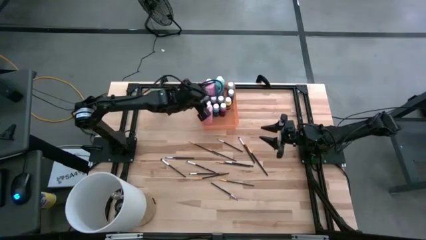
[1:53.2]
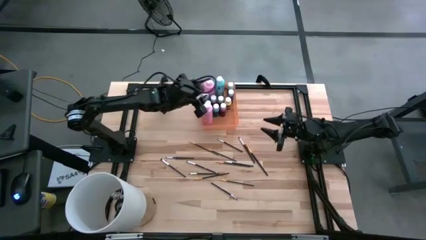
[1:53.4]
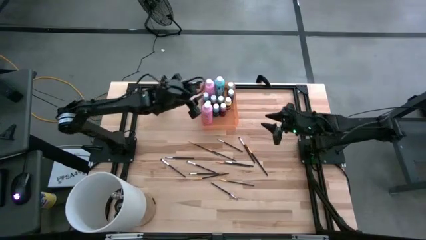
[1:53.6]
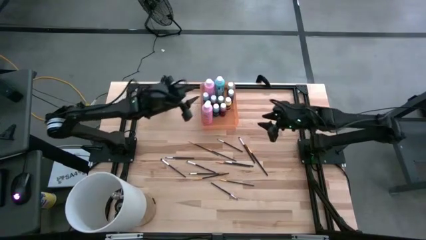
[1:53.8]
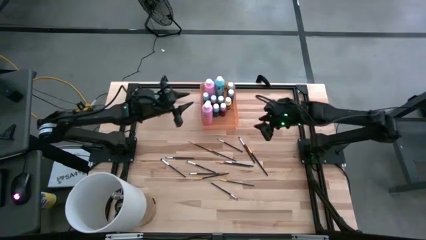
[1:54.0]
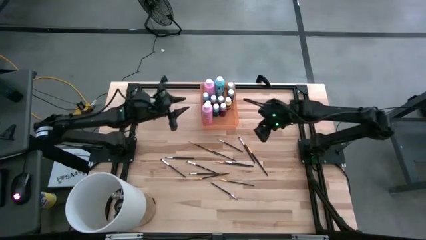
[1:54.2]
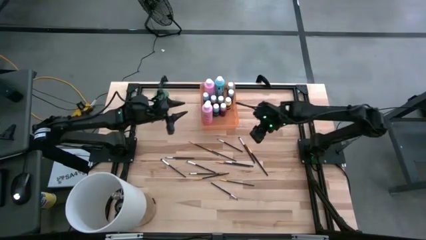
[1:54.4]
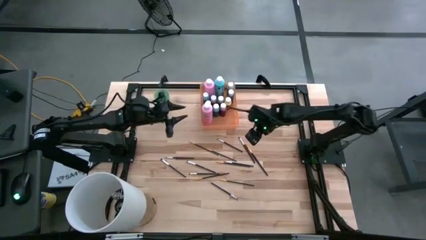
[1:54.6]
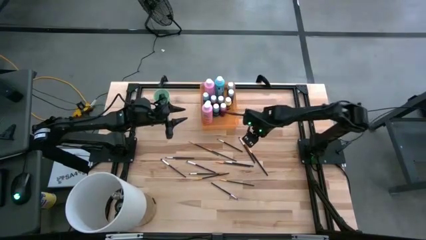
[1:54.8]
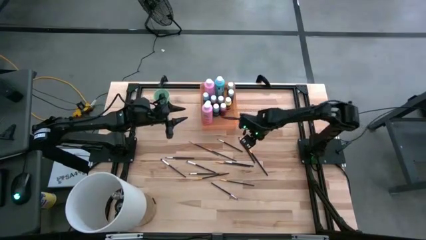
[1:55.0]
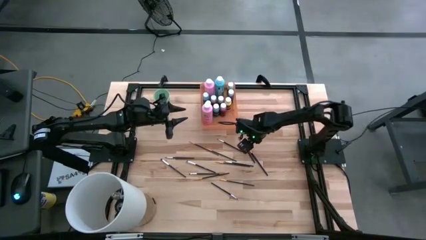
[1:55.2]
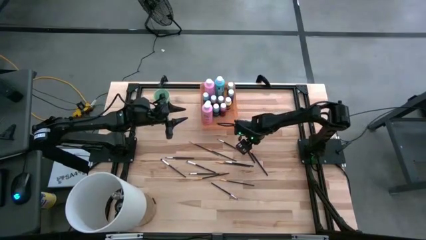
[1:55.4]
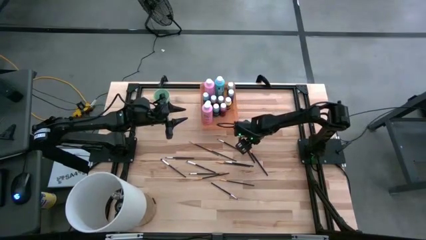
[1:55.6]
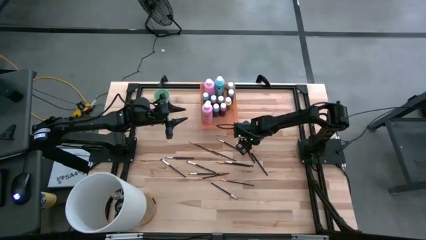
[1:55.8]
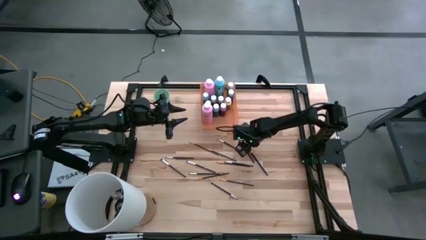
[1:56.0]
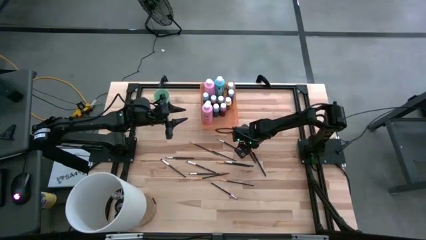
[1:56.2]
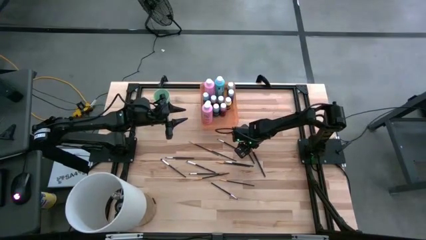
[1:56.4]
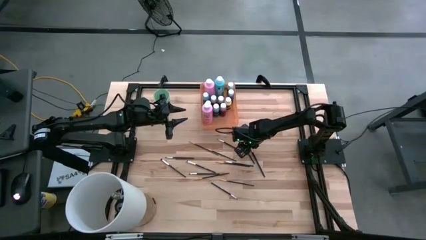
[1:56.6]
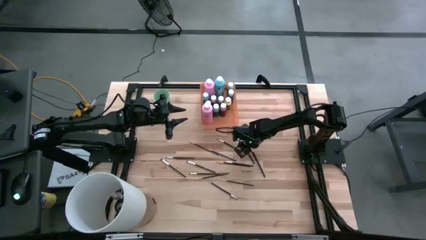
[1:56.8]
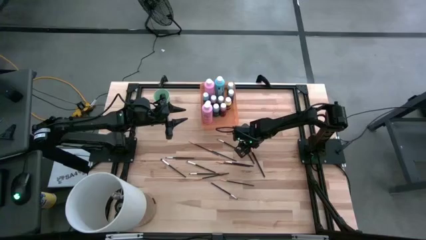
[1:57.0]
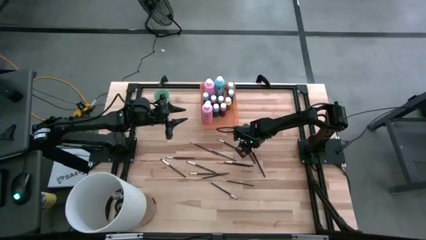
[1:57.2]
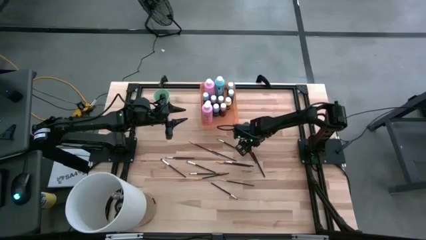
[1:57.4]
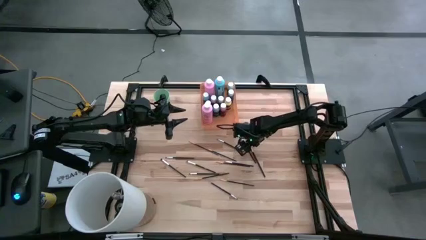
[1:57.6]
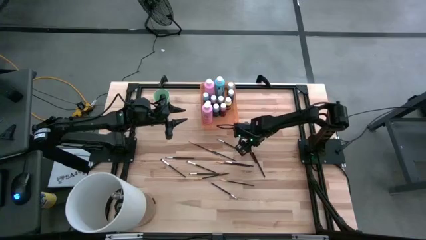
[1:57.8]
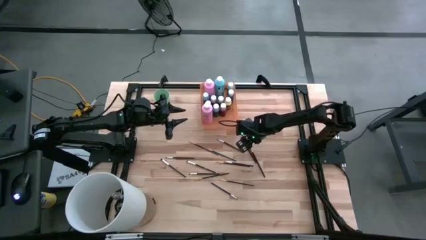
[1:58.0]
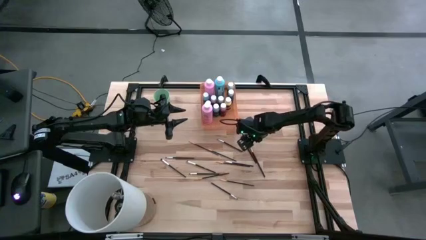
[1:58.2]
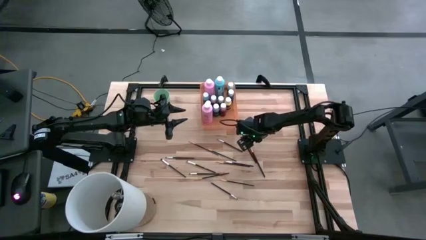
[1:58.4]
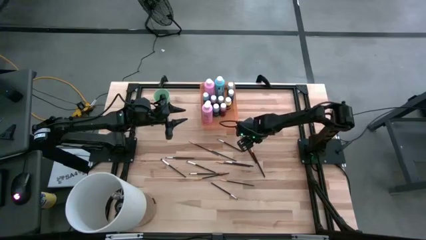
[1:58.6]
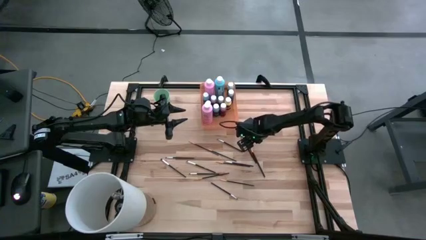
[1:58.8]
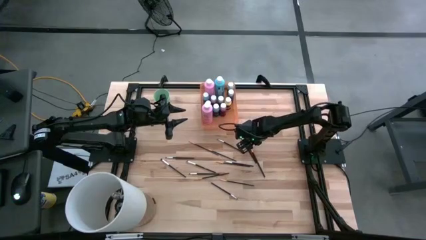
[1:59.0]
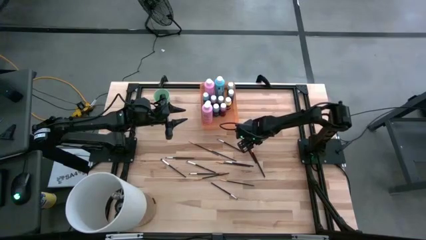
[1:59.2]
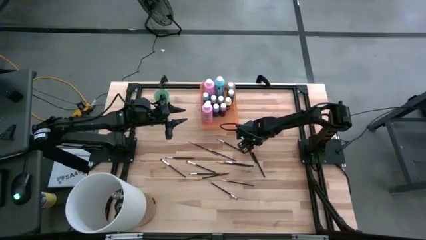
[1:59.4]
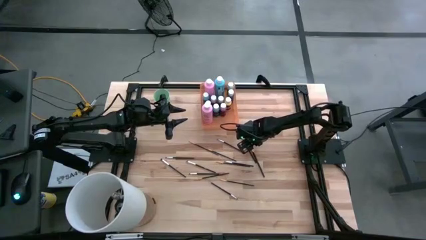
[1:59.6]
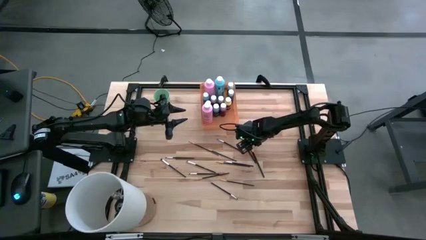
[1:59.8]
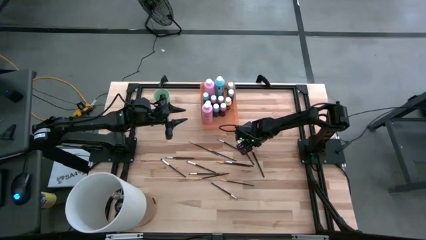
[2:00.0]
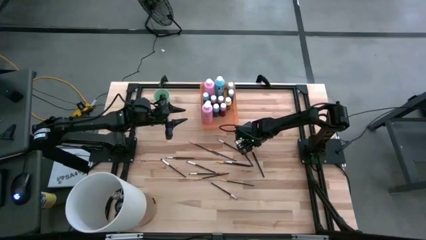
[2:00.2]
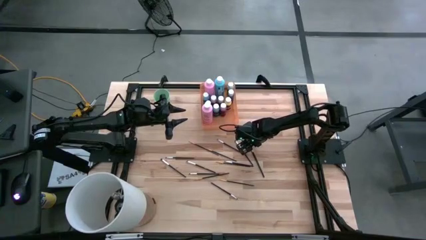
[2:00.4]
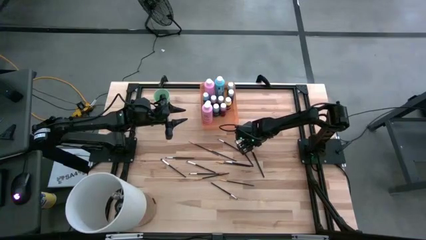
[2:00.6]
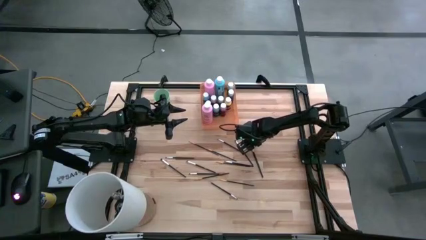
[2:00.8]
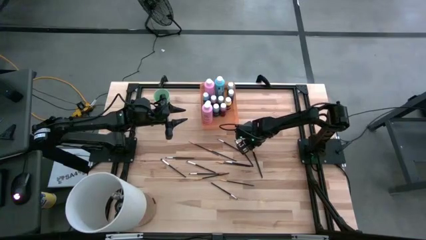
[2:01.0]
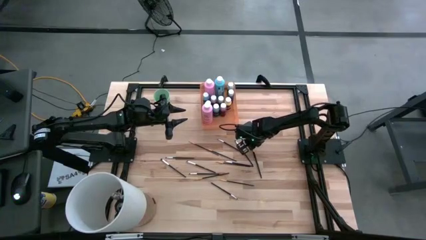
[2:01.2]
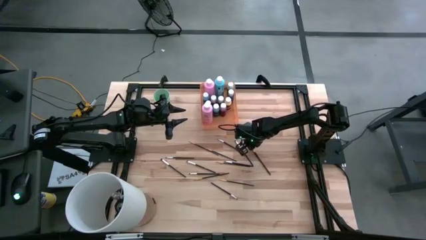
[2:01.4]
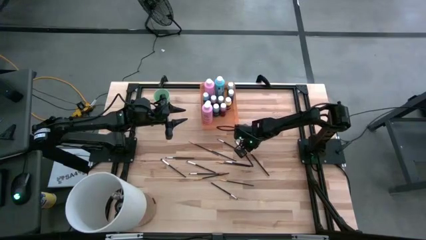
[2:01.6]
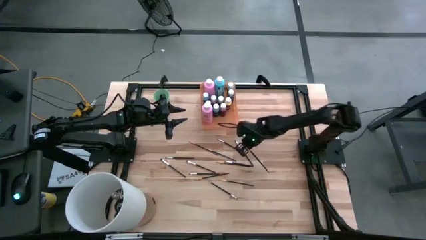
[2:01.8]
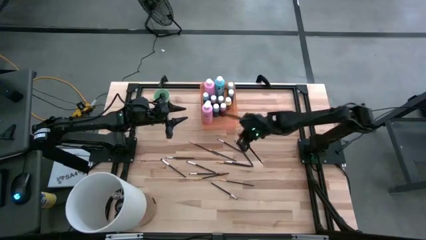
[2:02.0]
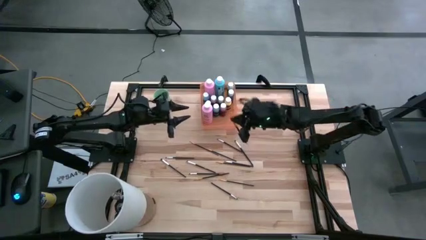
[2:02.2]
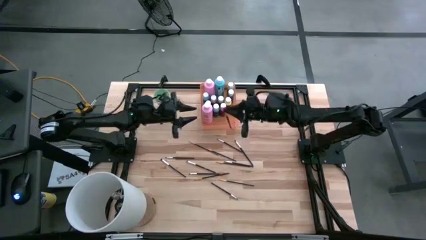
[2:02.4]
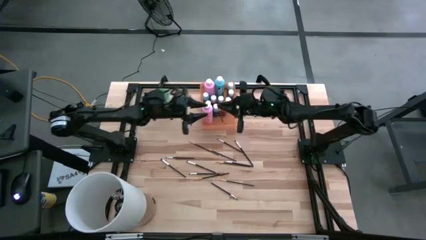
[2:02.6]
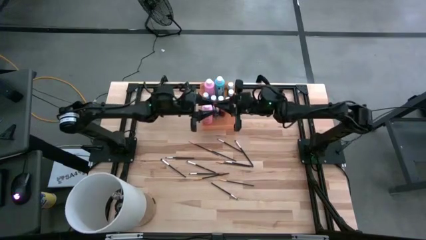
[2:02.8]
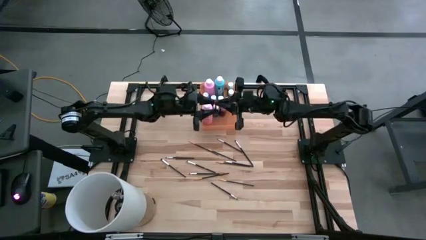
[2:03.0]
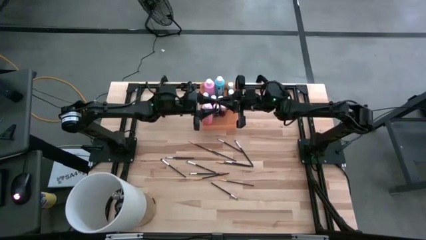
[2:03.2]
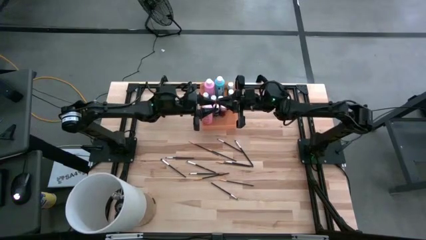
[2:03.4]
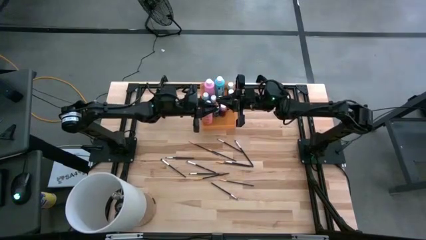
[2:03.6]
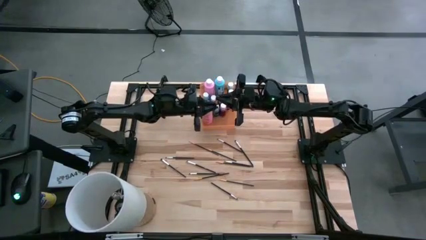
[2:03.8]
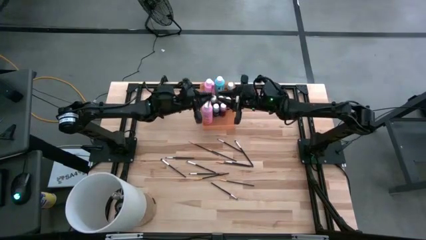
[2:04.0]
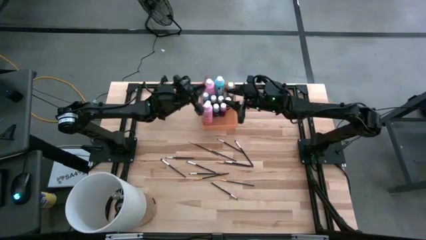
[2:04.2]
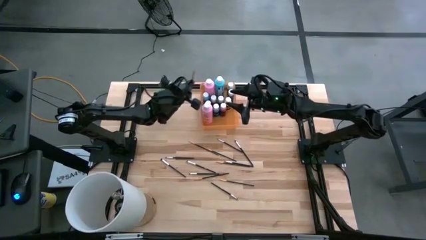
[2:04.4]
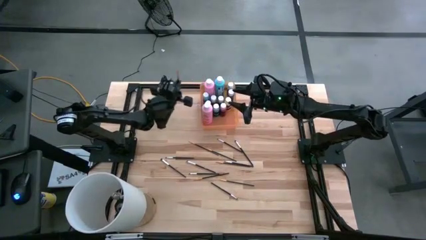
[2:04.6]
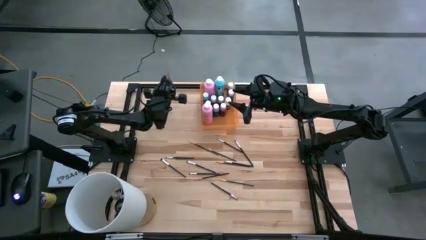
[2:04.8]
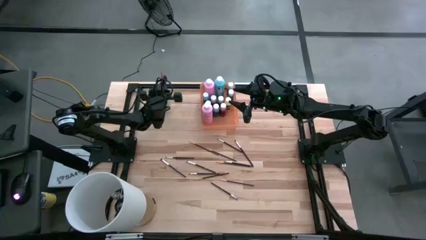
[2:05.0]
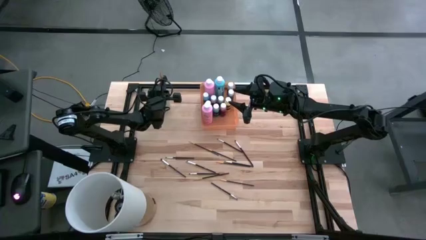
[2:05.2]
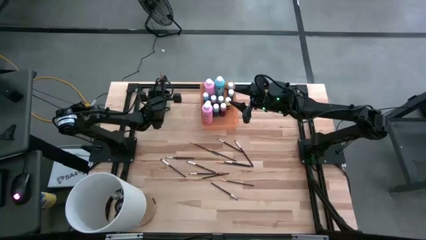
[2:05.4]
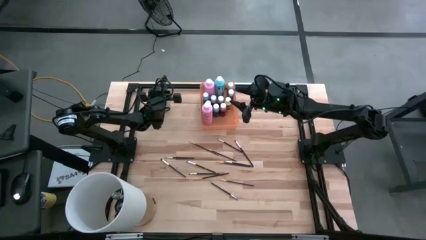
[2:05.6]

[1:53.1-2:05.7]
Task: Pick & Place Paint Supplies
Put the orange paintbrush into the cup
